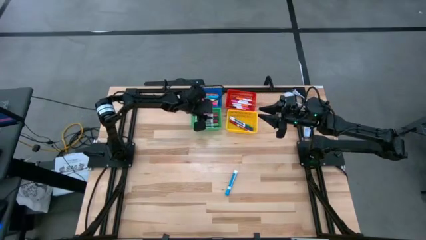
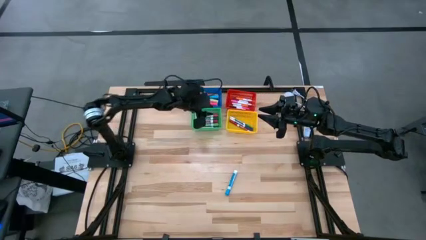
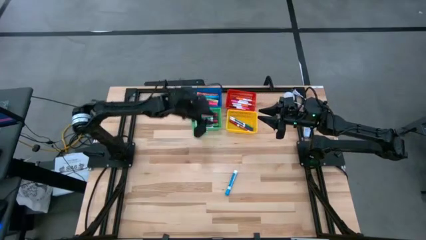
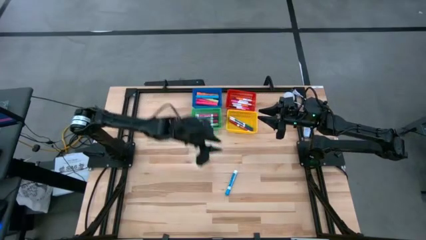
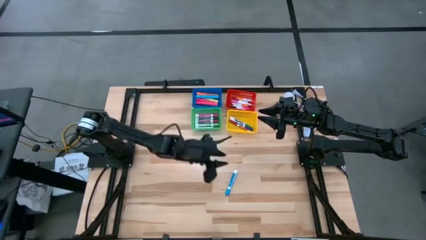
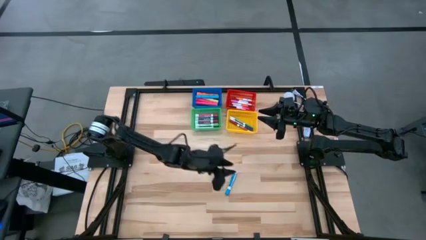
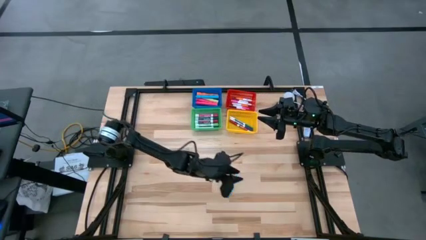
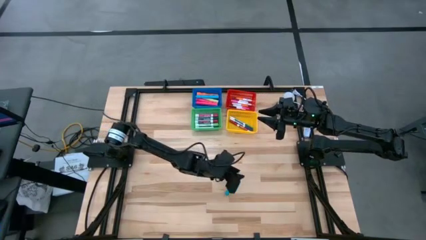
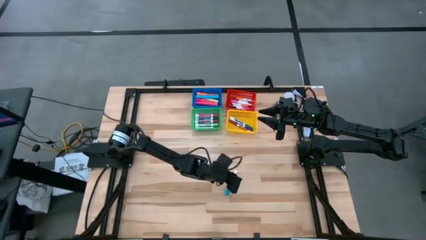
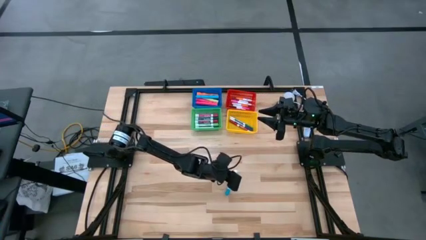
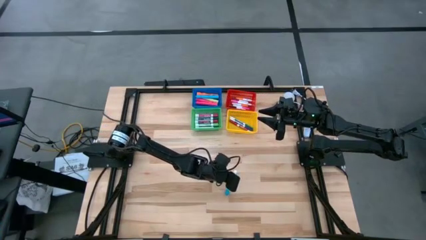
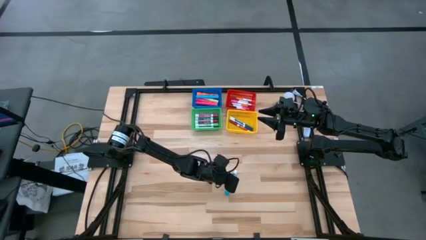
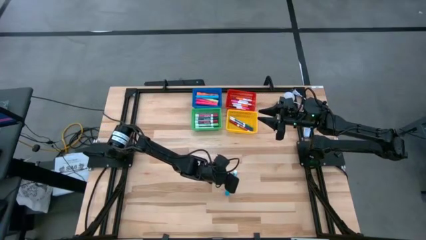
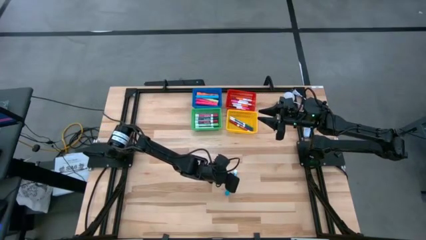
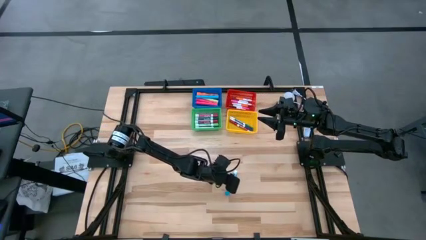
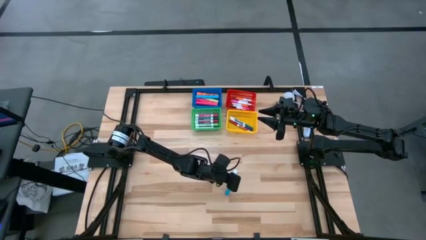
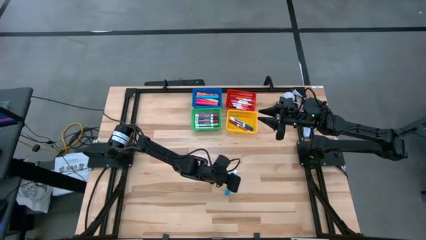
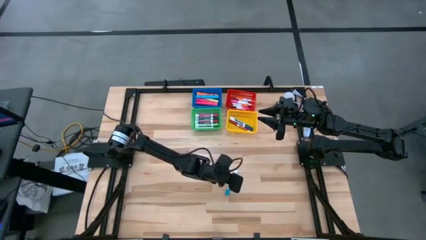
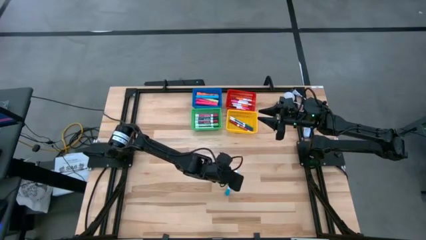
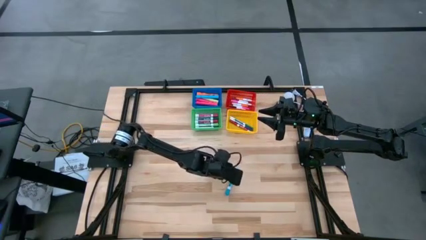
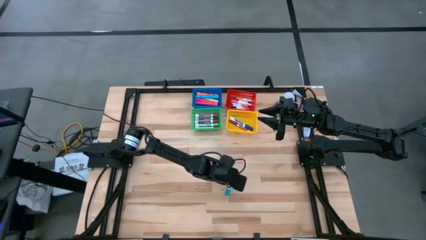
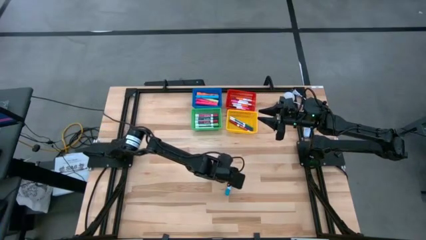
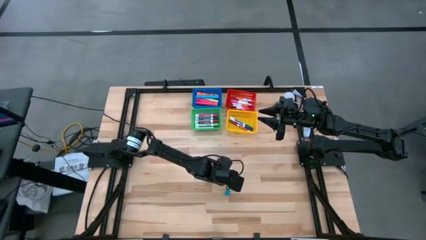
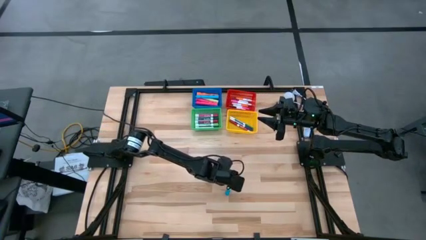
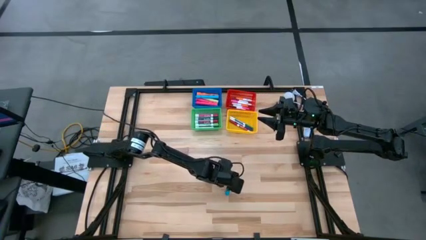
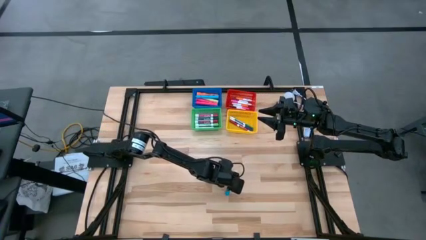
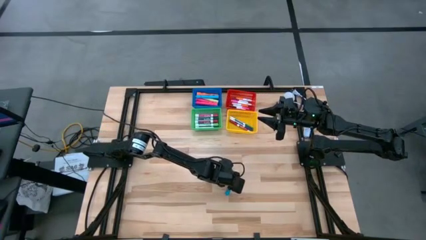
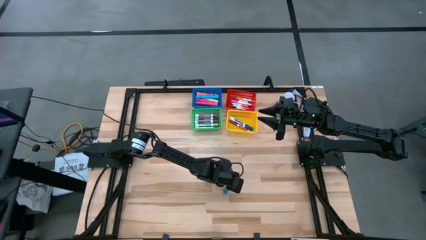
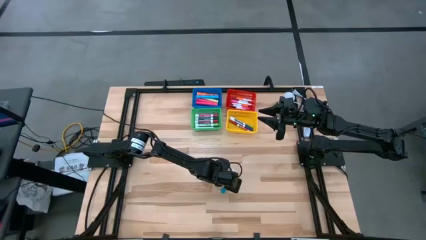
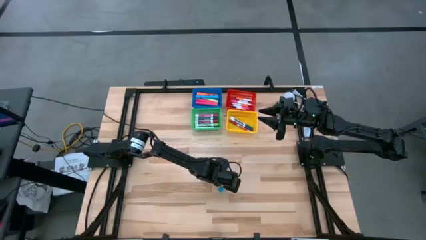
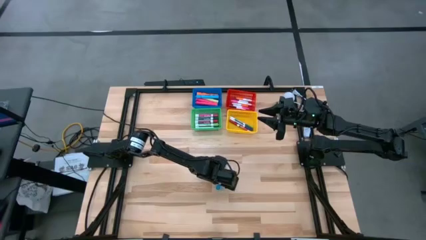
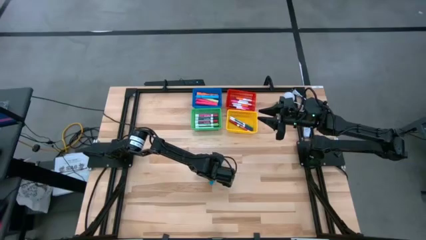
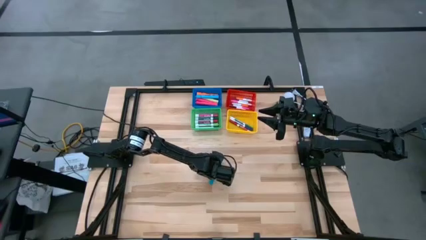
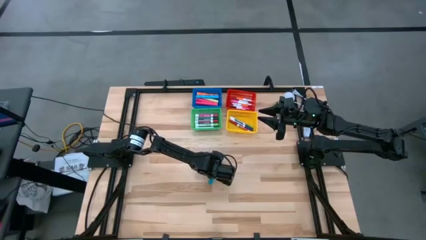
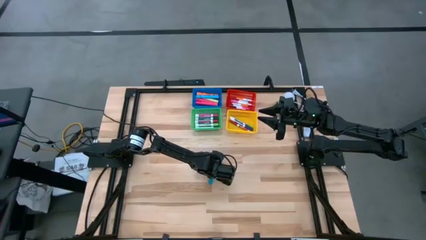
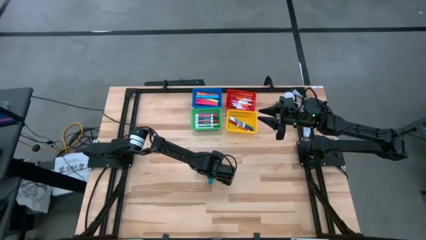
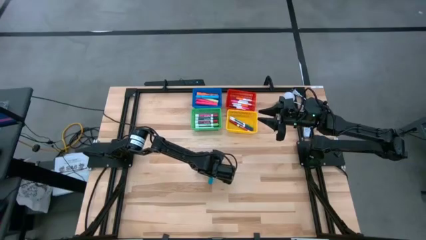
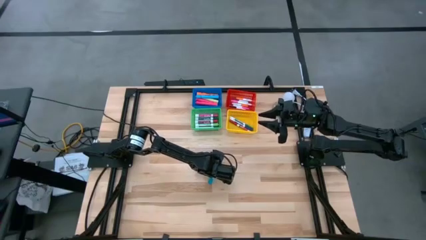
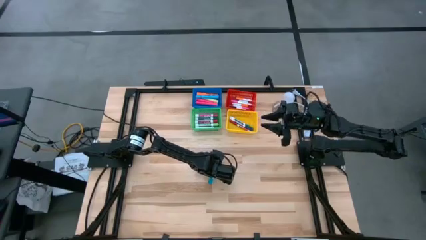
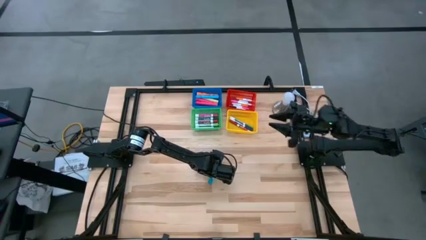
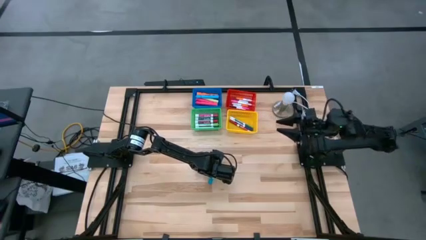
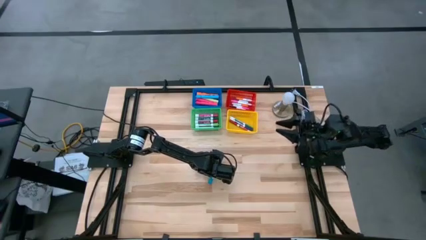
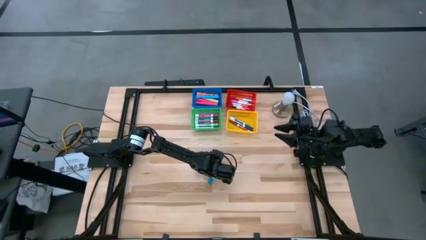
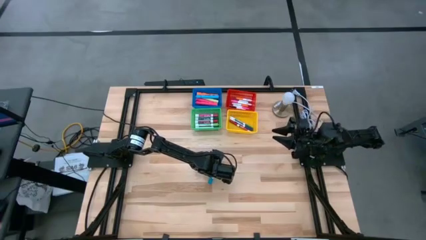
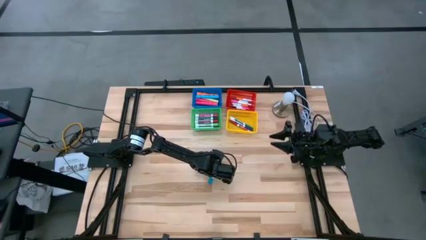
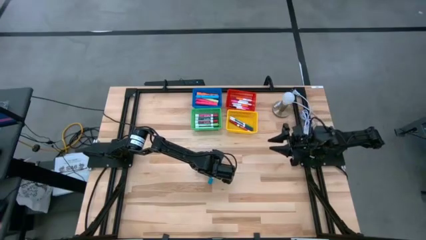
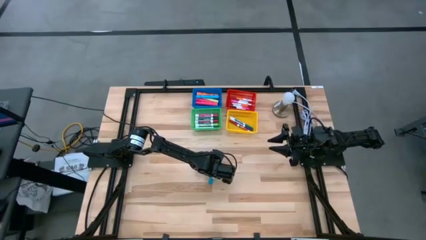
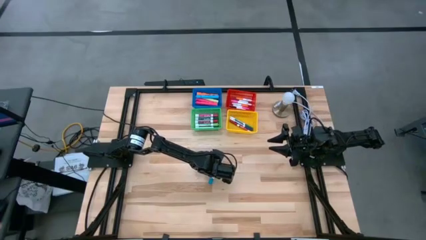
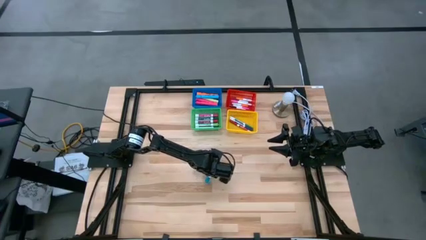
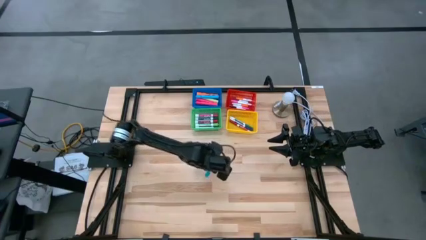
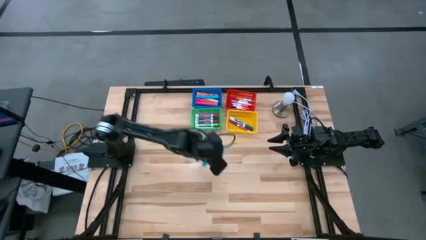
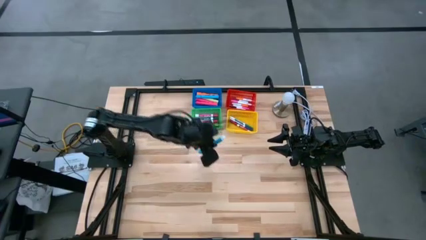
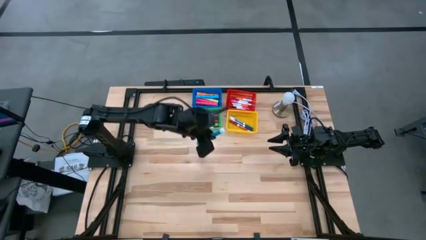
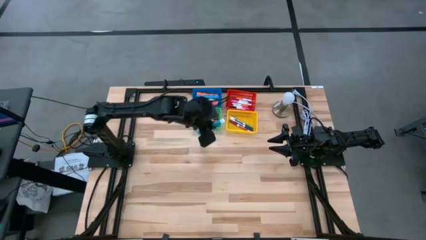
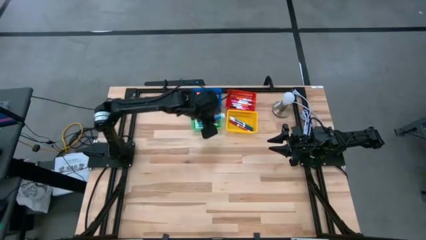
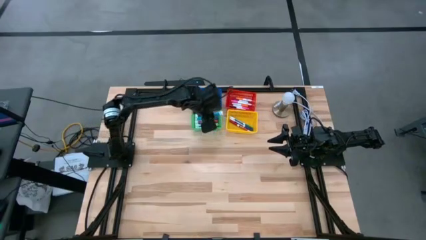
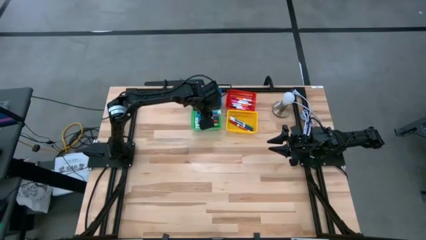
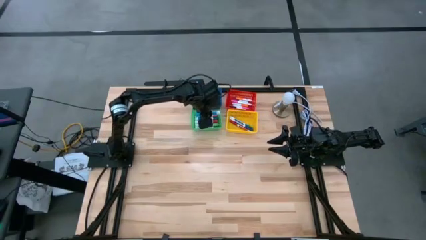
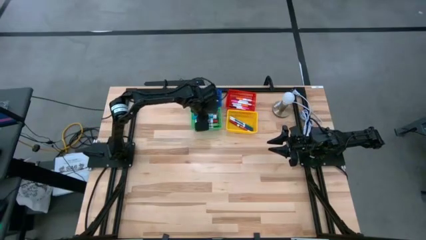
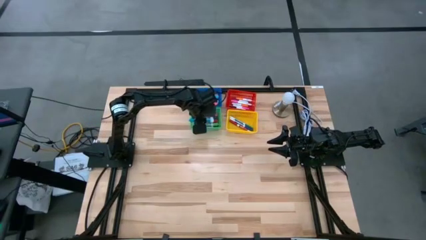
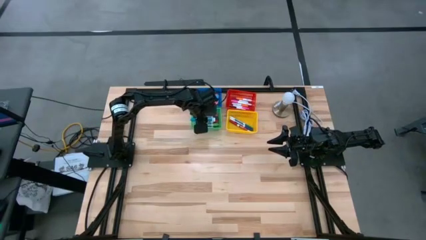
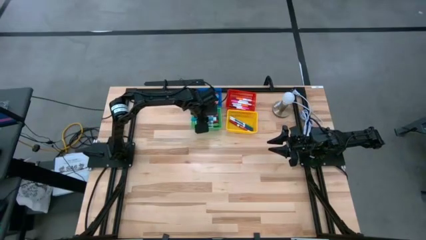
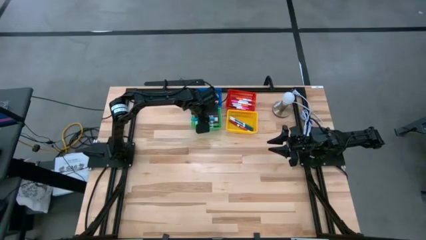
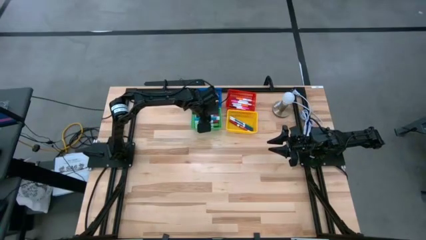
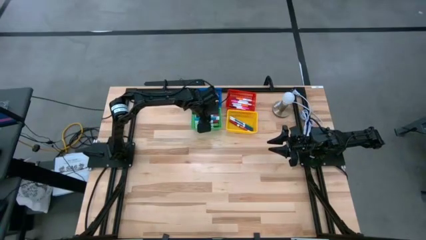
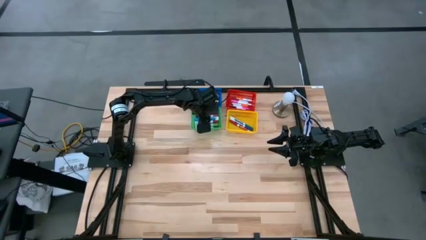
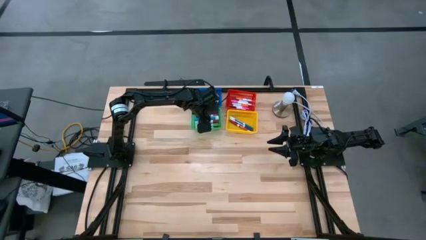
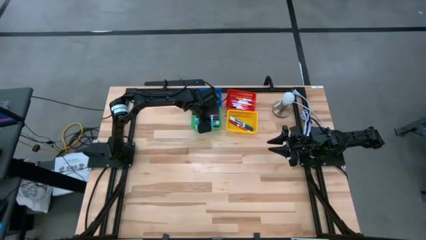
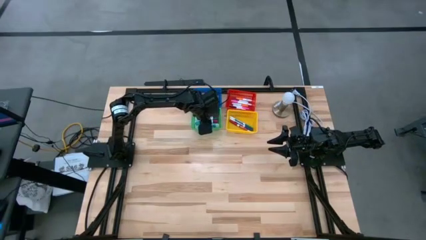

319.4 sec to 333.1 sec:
Task: Pick & Place Markers
Put the large blue marker into the green basket
